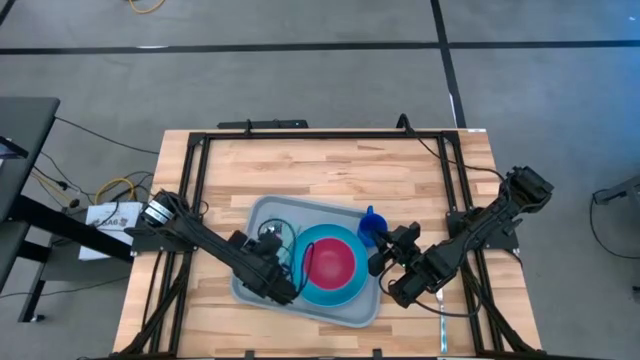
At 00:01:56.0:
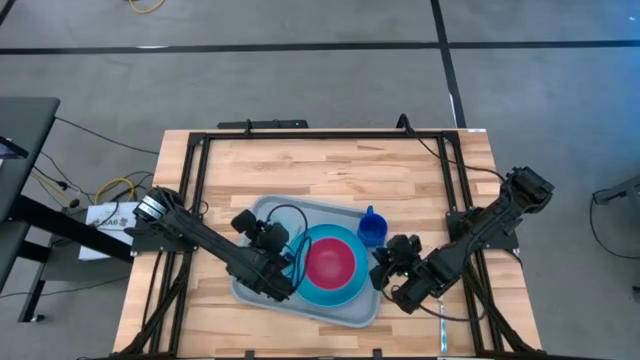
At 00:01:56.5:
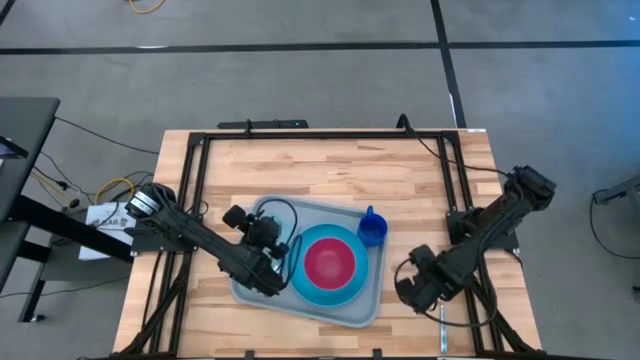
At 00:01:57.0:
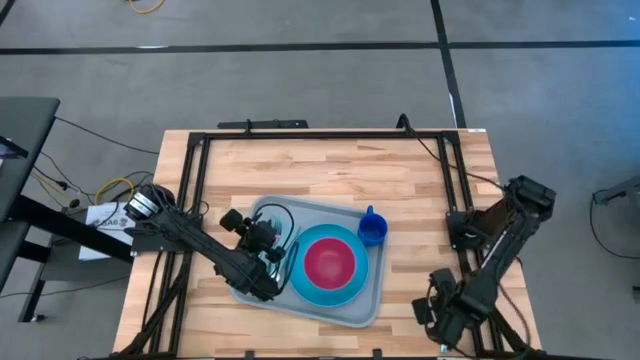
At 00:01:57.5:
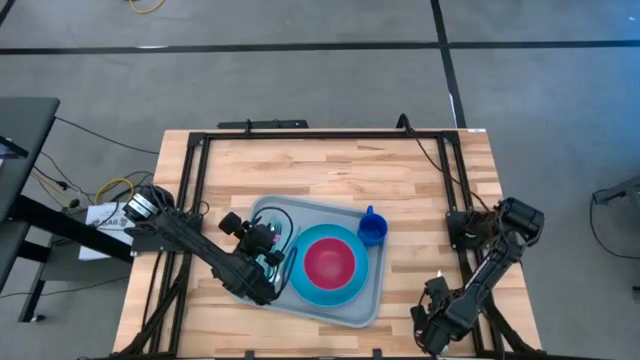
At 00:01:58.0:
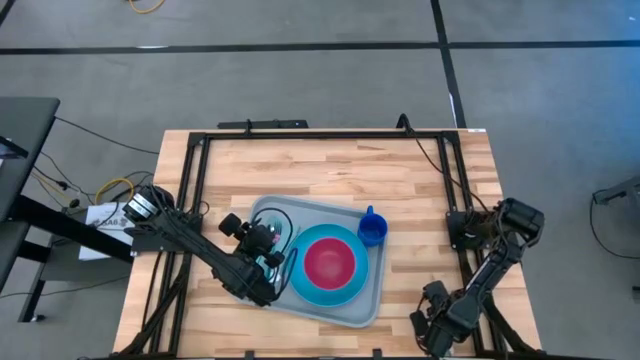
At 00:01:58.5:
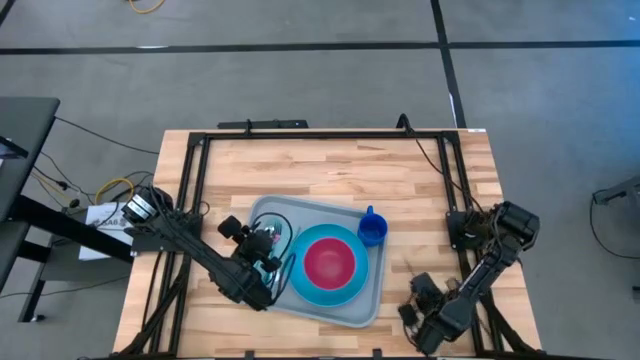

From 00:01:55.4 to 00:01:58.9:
Task: Set up tray
Put the white and blue knife on top of the green napkin to the right of the blue and purple fork

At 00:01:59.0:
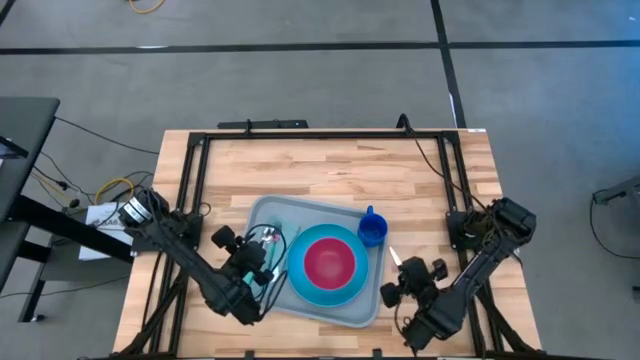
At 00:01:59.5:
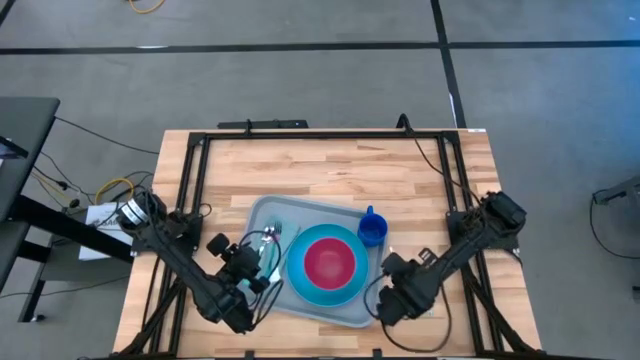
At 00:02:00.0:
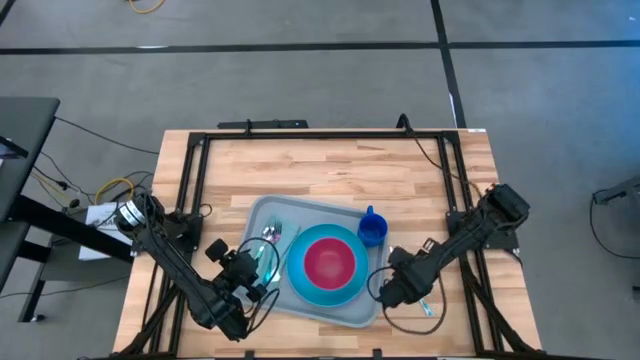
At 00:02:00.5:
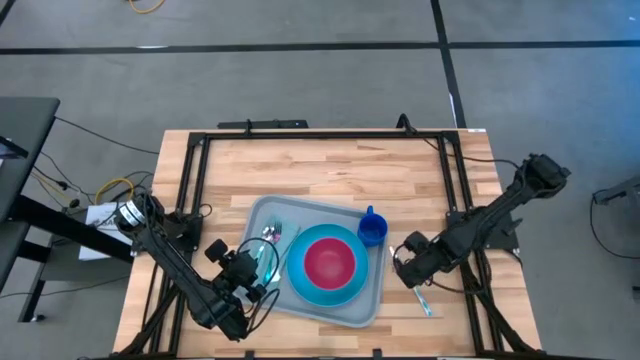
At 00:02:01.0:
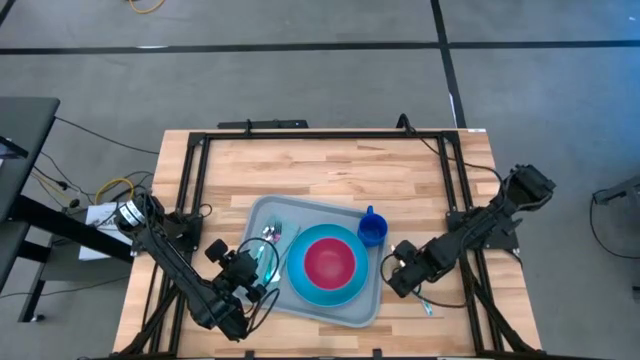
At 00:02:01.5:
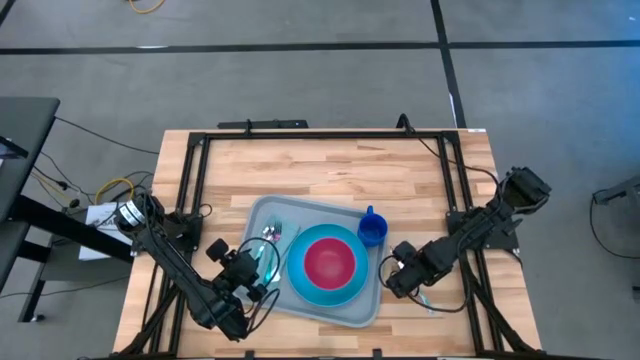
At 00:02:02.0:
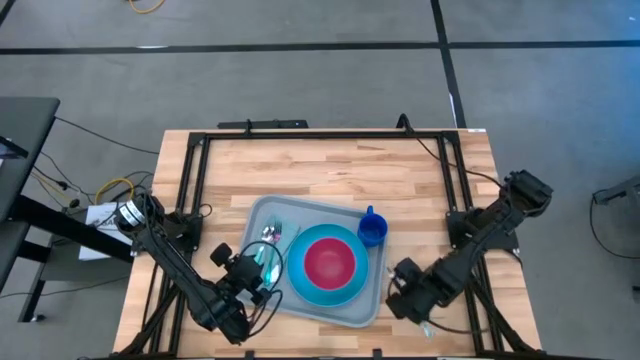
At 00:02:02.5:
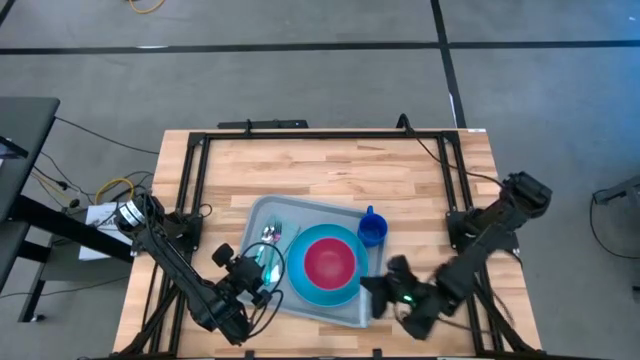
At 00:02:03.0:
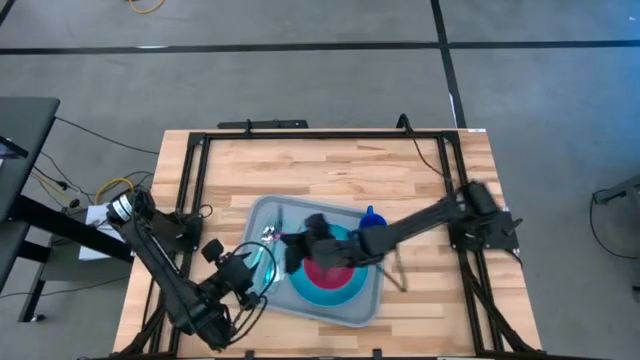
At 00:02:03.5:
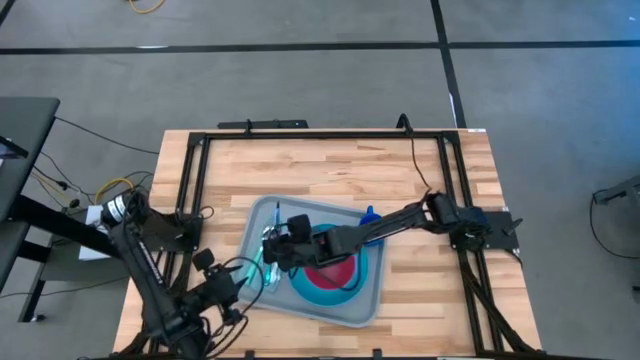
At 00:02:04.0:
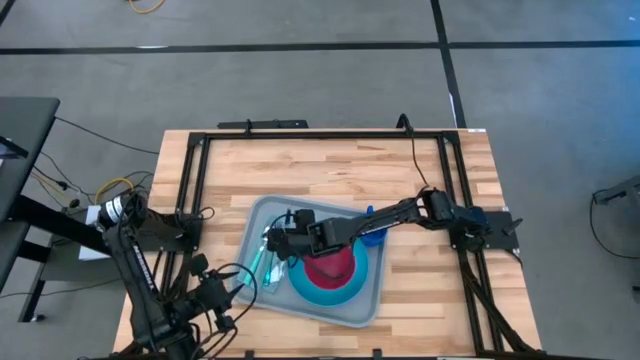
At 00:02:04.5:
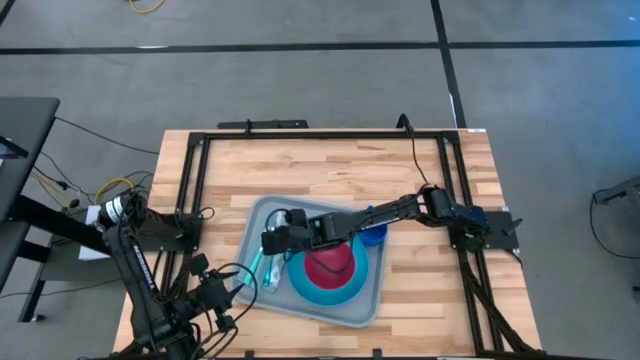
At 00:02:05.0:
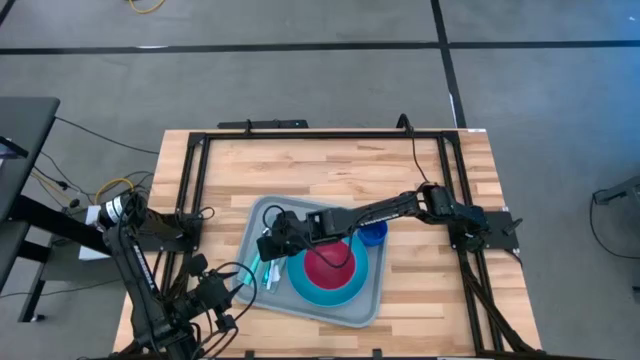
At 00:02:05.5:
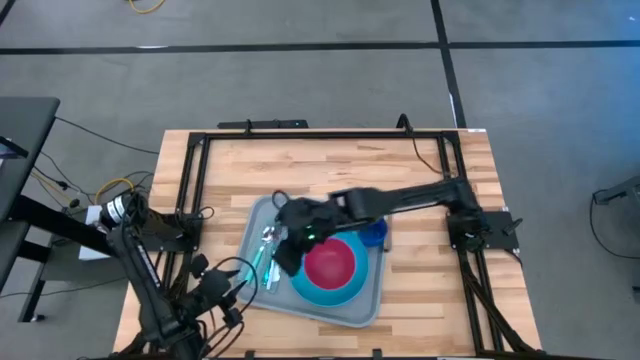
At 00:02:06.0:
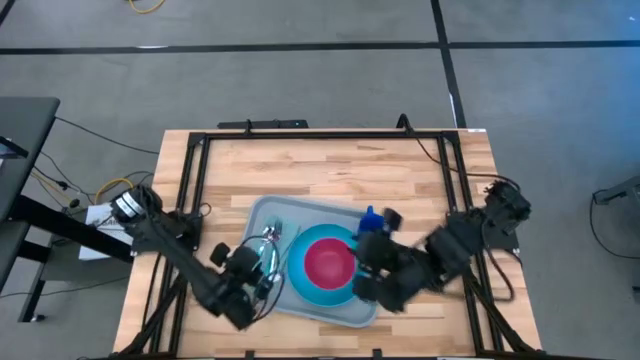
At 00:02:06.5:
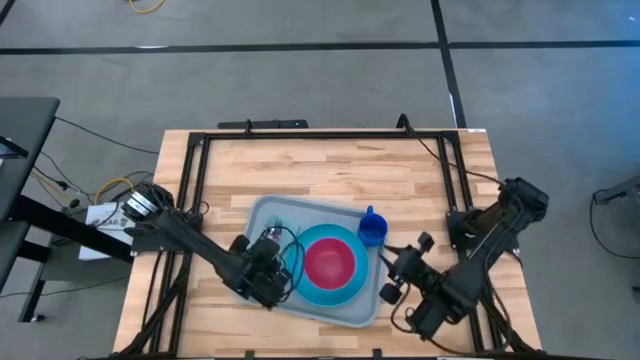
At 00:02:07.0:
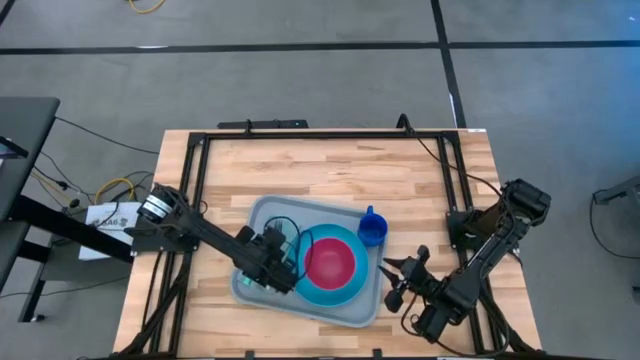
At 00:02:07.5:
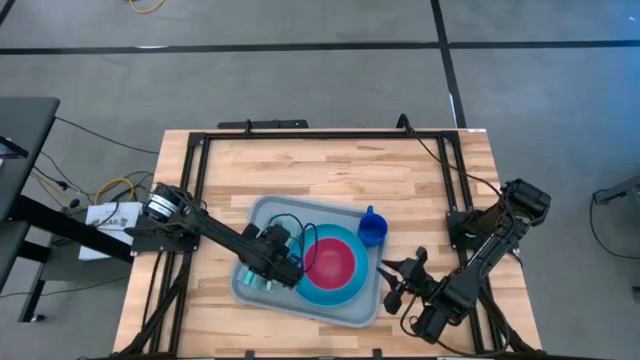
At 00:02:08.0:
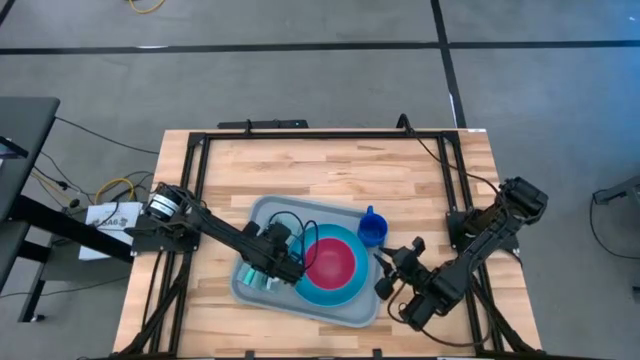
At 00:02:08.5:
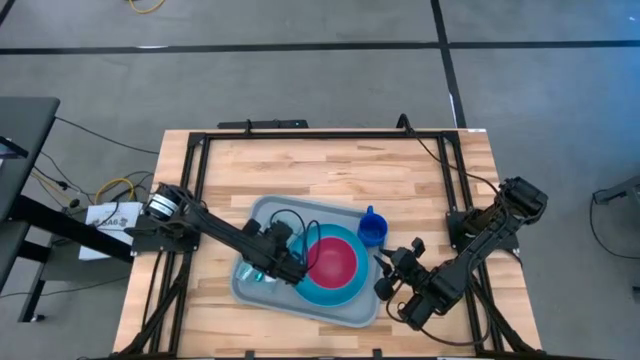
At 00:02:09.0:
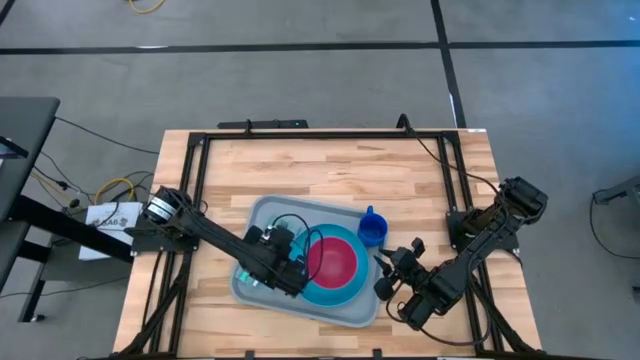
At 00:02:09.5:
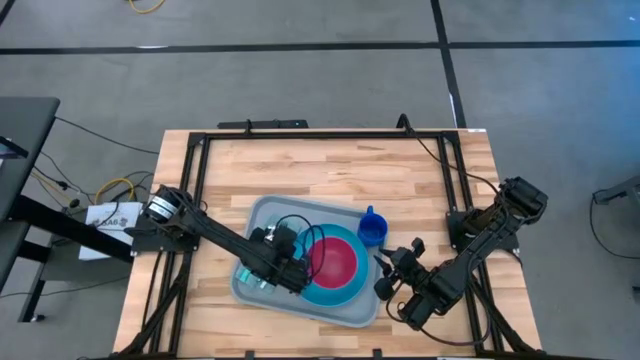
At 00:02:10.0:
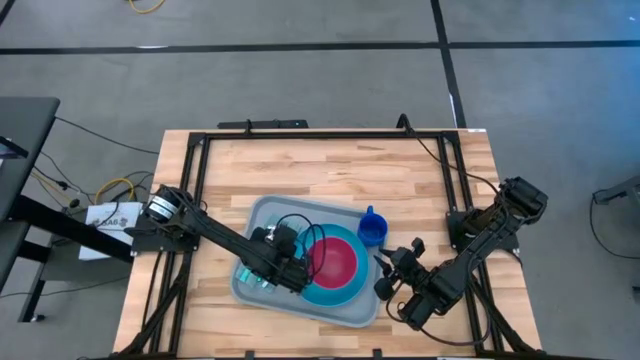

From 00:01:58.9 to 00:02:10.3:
Put the white and blue knife on top of the green napkin to the right of the blue and purple fork
